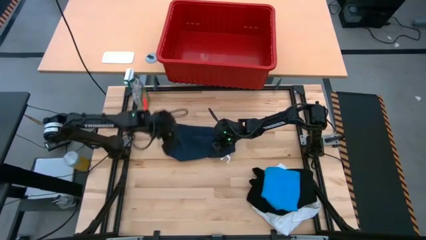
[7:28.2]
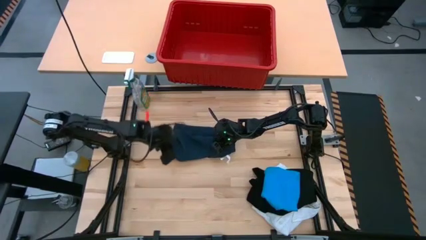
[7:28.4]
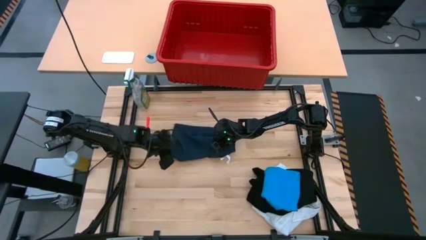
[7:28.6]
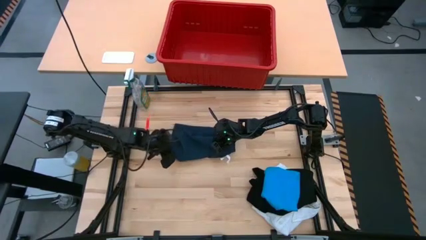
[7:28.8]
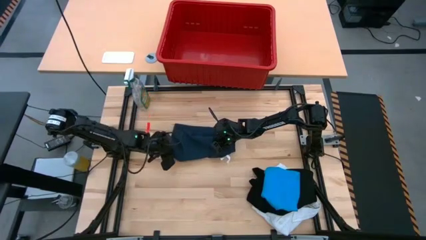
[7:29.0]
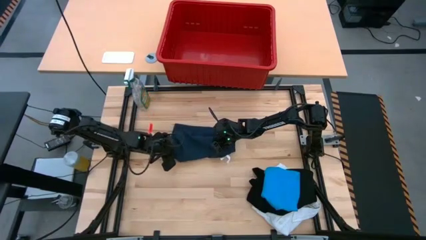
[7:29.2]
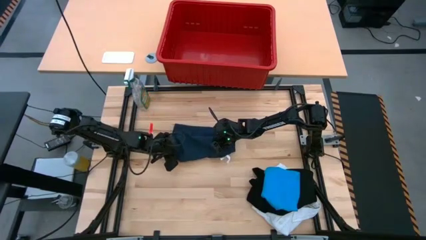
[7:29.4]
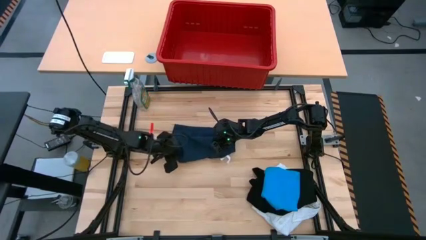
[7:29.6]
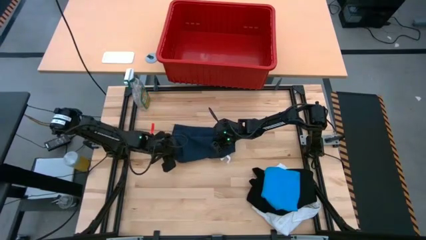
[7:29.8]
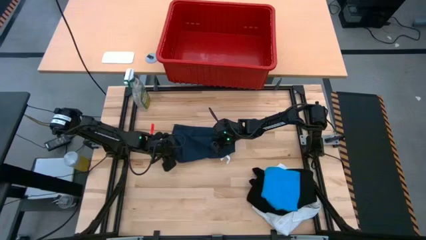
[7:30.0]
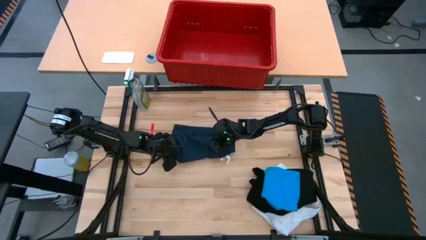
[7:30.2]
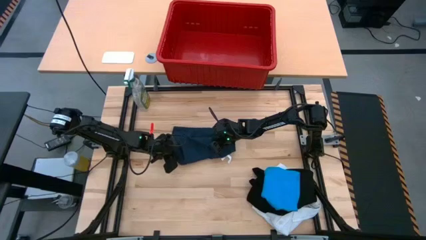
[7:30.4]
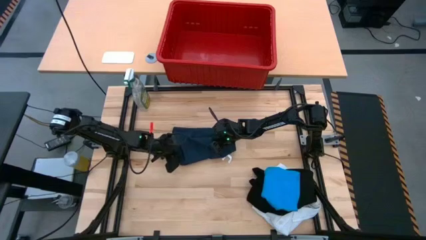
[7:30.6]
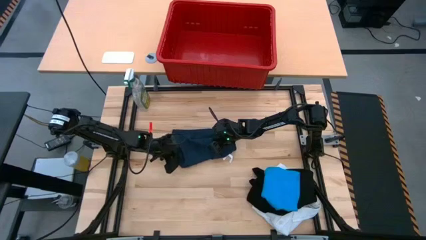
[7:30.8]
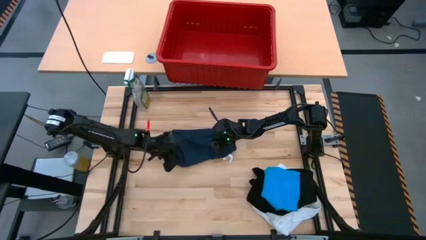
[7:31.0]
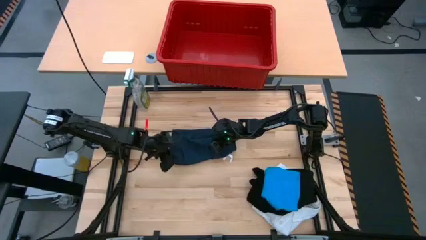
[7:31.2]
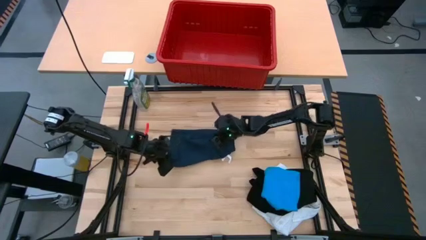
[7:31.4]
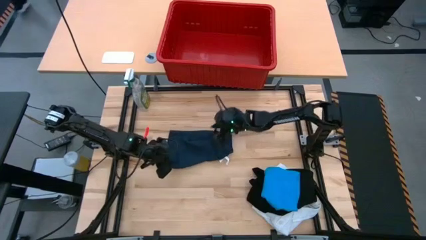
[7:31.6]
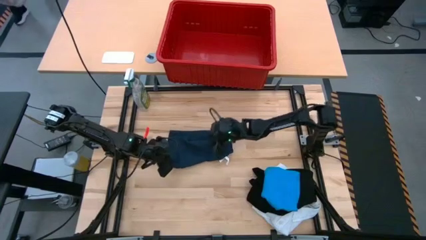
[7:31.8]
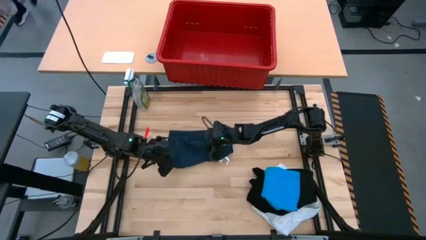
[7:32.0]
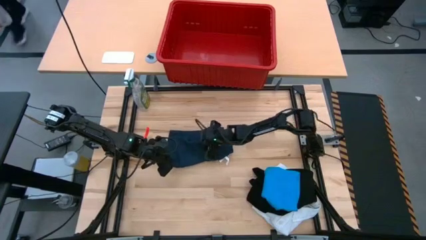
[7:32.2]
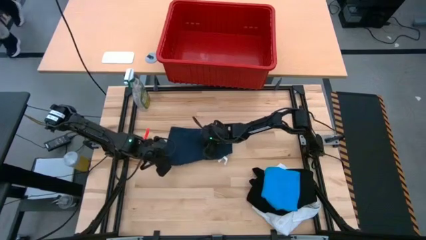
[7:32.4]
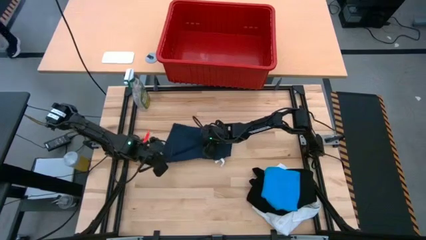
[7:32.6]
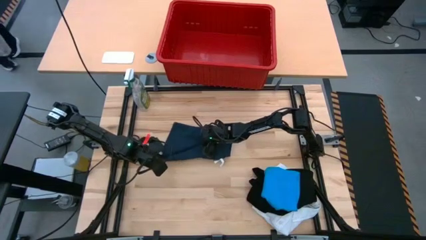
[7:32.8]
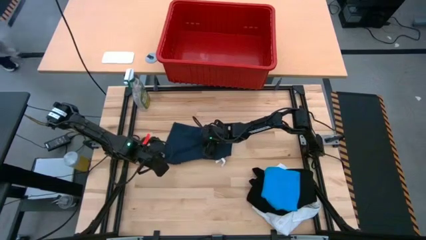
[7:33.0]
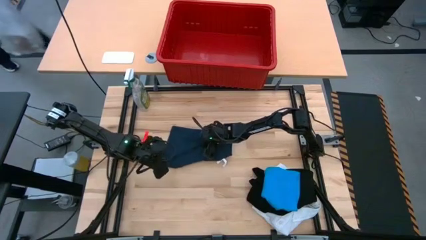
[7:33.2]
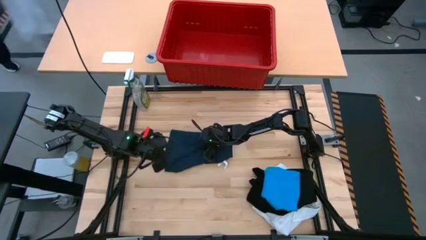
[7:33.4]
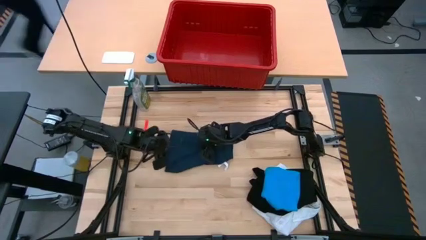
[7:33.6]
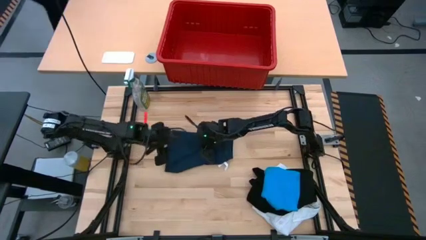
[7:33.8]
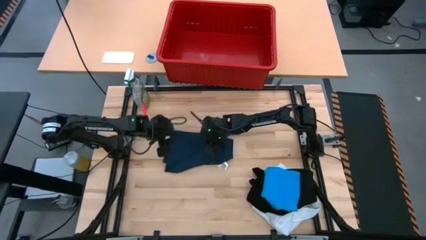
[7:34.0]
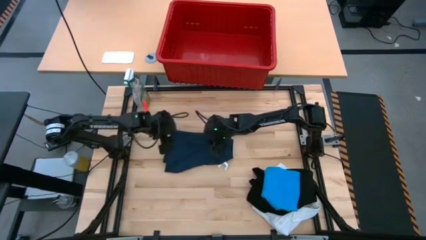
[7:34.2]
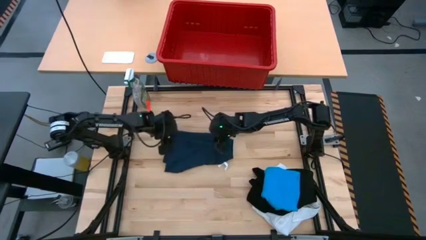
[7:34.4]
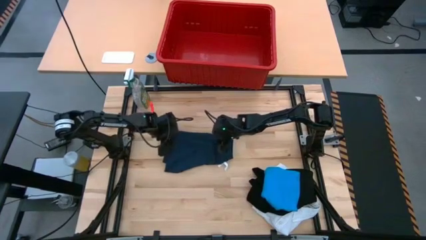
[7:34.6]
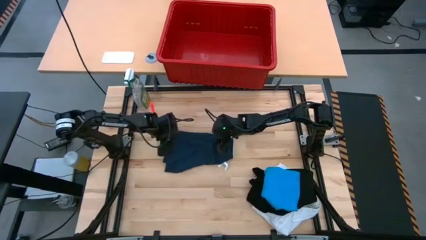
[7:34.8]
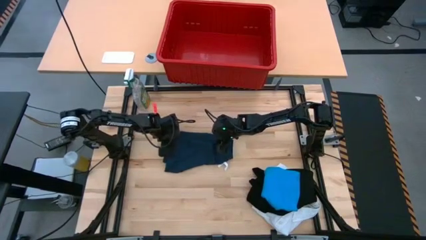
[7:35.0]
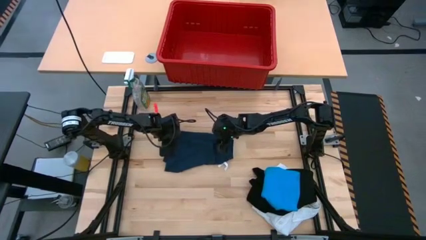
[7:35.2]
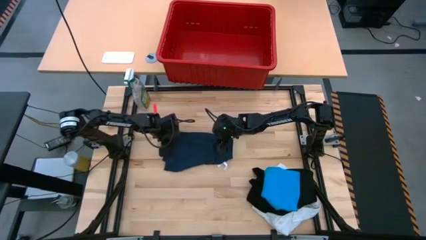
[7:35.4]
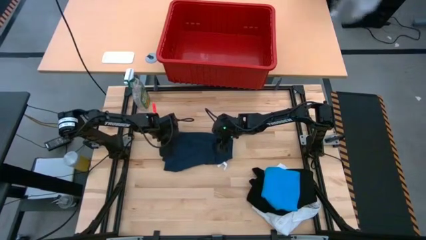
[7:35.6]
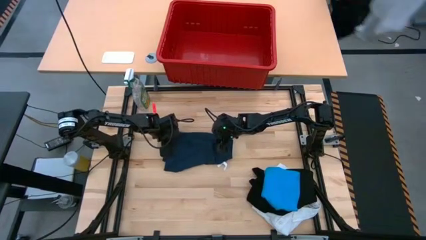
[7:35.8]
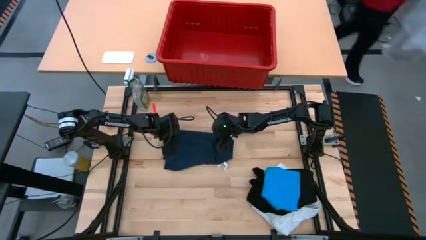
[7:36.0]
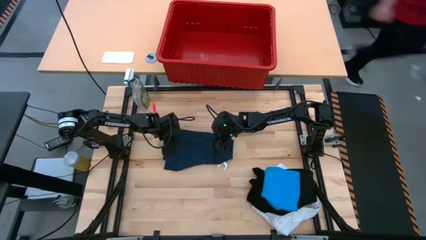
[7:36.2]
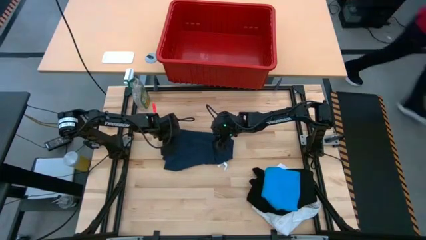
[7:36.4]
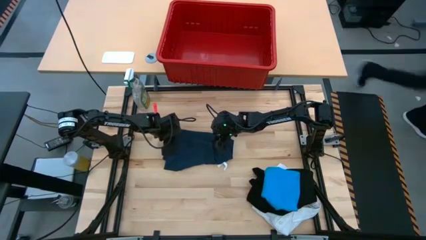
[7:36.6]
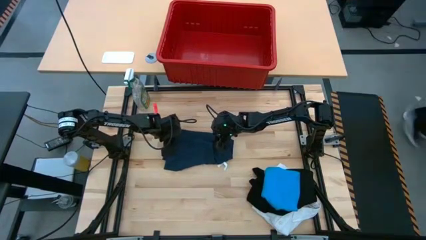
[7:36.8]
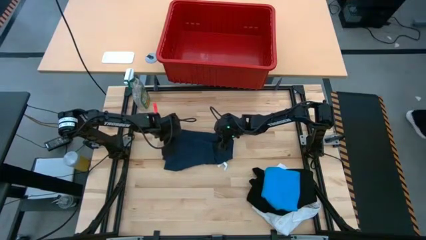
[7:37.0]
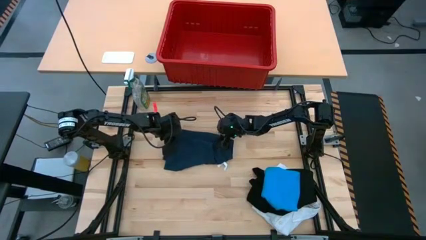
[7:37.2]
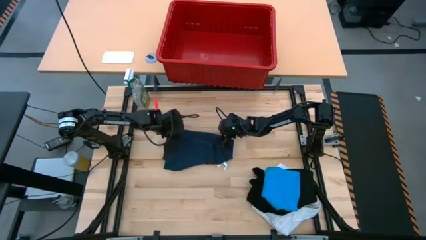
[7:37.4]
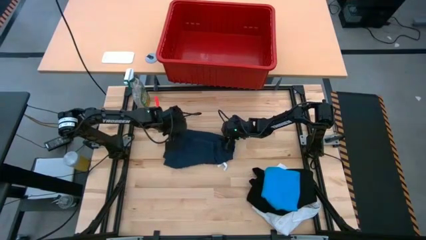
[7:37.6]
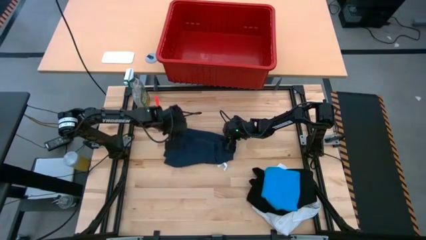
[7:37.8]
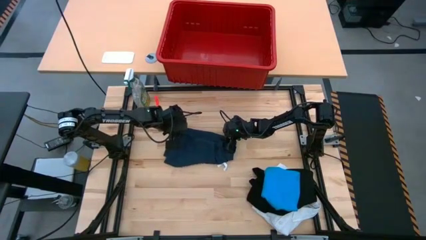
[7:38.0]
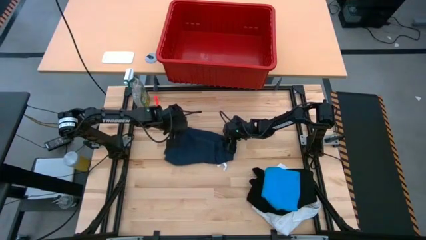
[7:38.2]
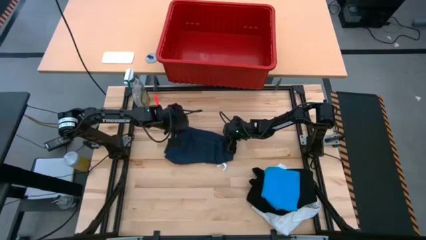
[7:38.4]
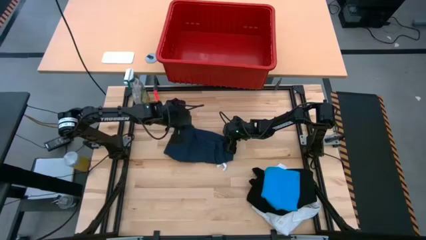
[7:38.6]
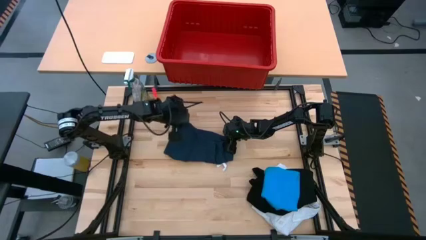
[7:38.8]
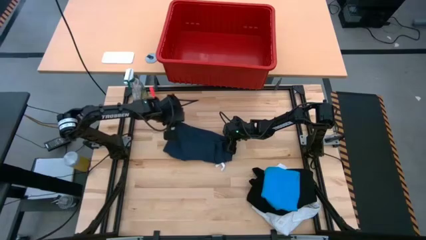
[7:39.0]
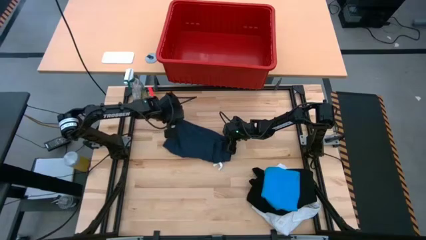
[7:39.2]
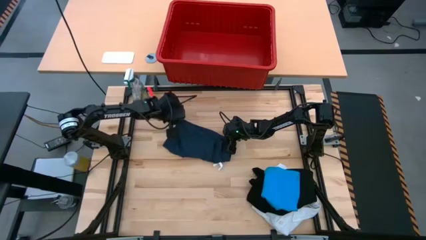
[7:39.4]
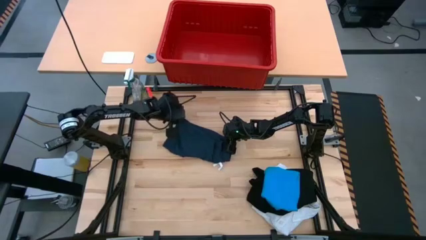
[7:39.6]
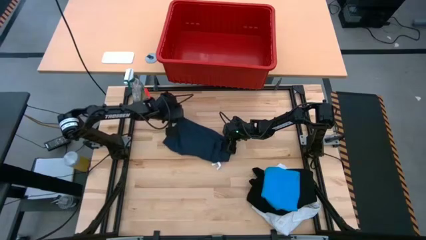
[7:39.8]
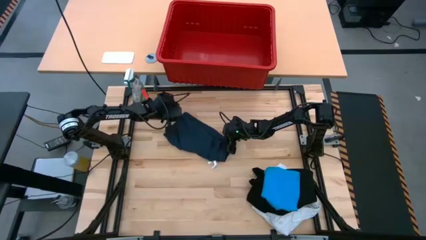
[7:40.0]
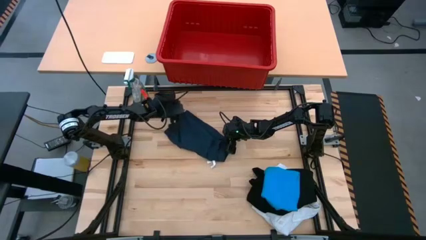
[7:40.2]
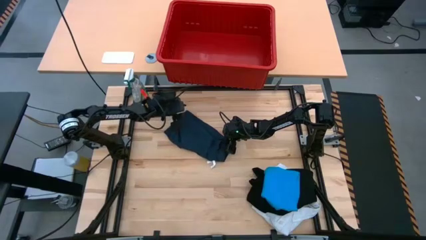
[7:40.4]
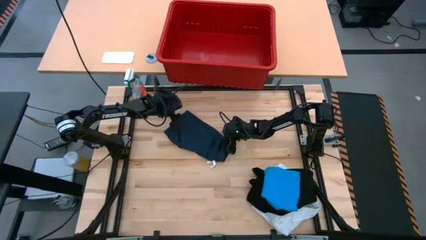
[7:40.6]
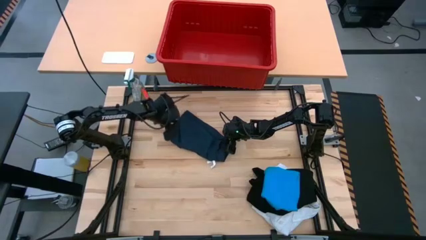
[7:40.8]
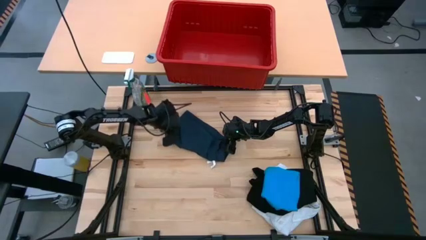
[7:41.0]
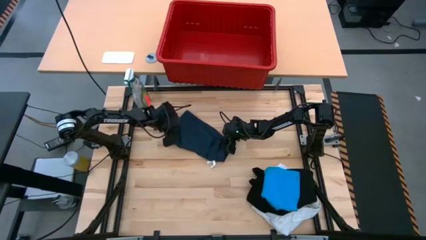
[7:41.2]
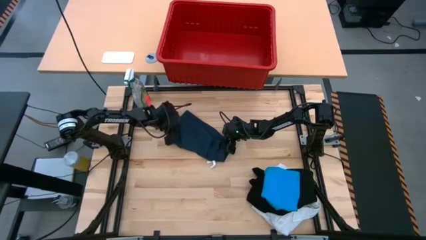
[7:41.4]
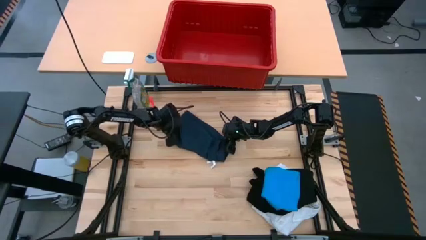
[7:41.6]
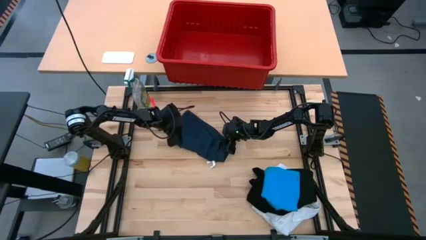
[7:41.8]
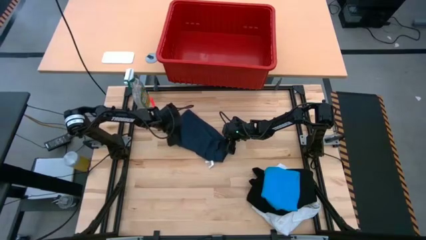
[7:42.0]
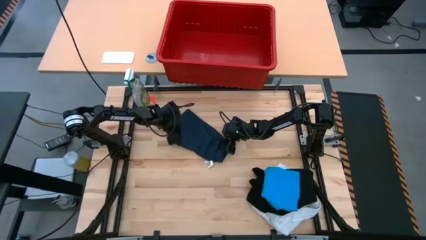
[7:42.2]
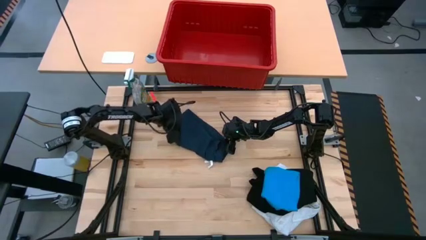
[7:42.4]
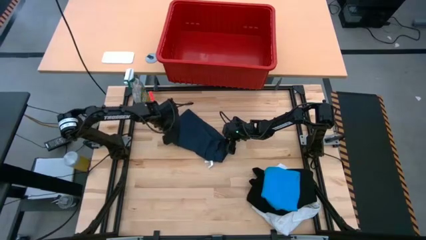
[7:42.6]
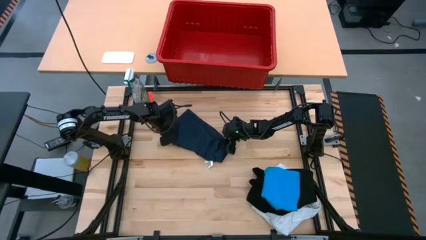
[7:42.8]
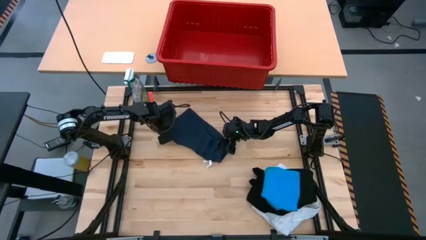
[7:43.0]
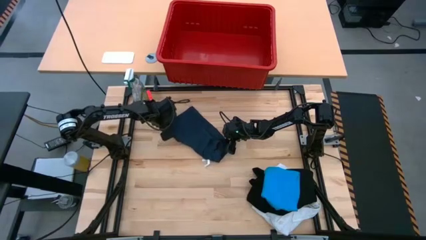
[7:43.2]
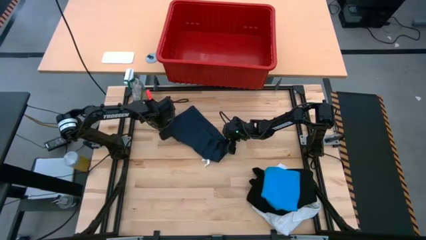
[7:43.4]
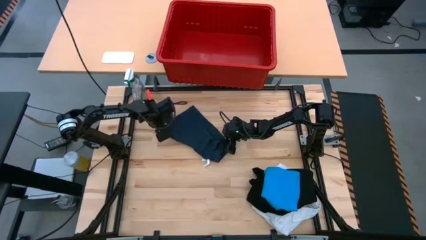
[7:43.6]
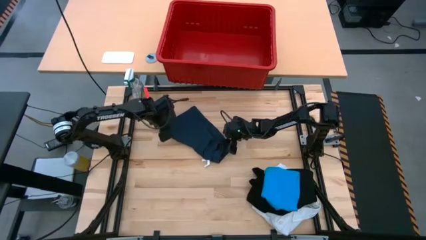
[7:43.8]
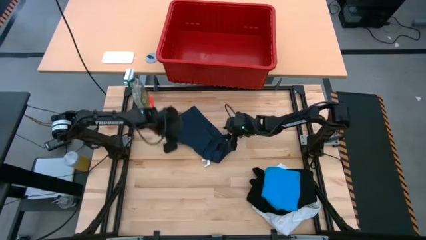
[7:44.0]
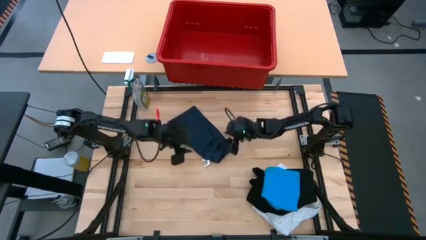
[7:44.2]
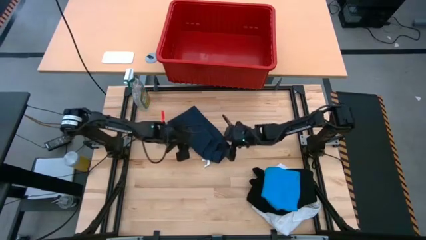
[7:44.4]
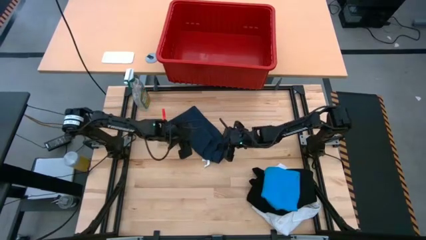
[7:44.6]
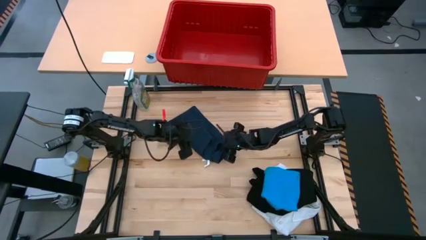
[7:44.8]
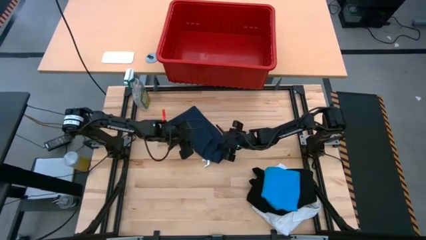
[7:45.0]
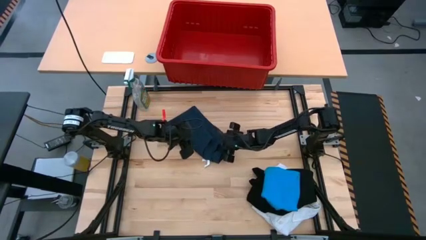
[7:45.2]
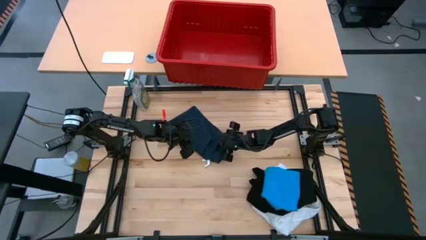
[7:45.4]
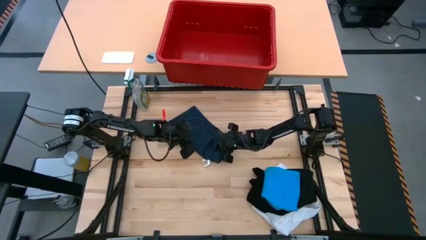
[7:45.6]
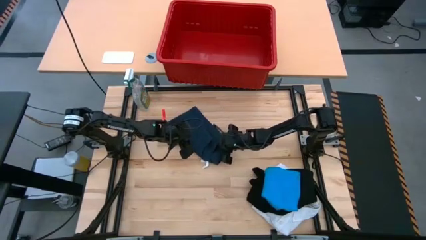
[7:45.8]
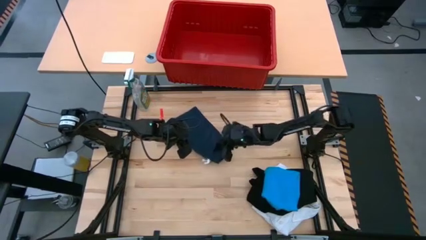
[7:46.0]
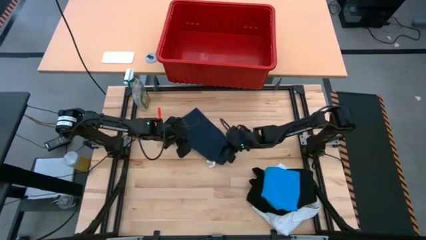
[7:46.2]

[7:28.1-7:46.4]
Task: Fold laundry
Fold the dark blue shorts
